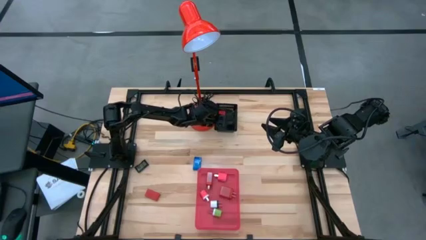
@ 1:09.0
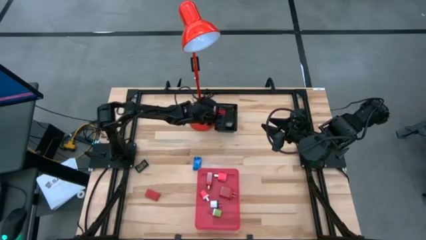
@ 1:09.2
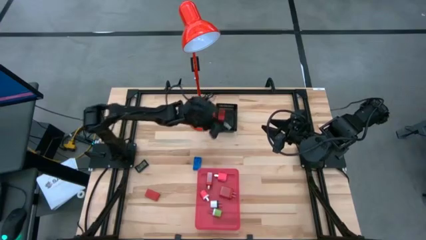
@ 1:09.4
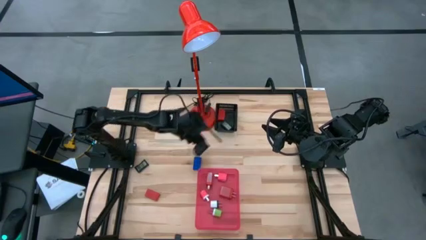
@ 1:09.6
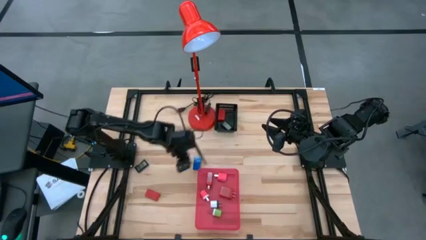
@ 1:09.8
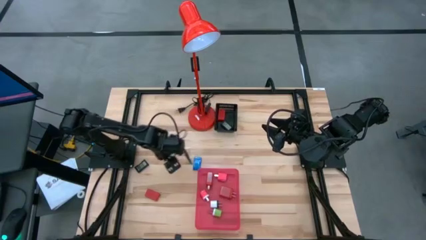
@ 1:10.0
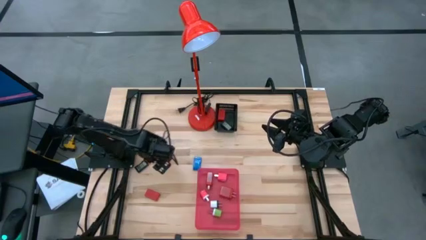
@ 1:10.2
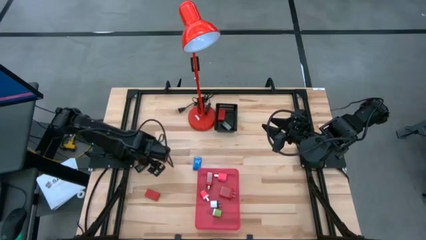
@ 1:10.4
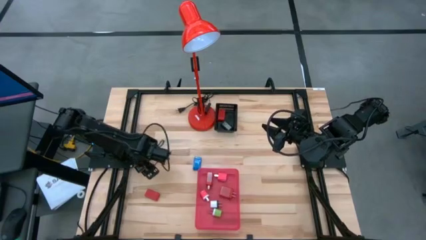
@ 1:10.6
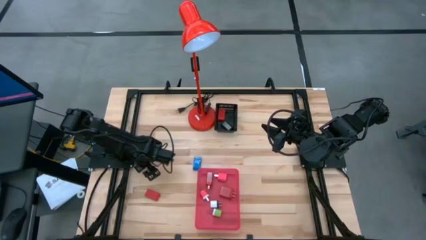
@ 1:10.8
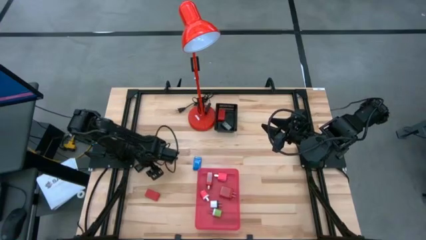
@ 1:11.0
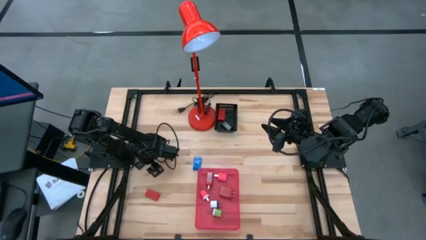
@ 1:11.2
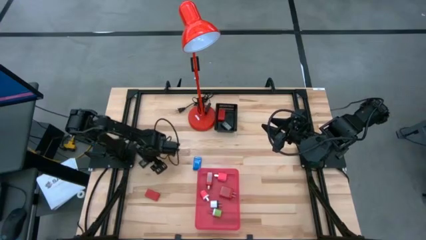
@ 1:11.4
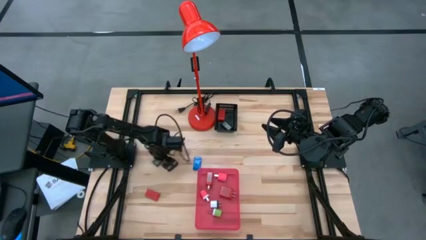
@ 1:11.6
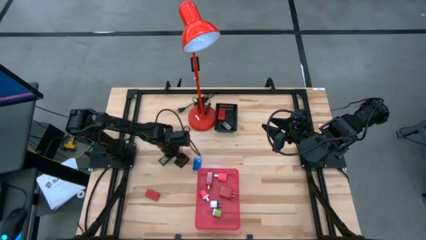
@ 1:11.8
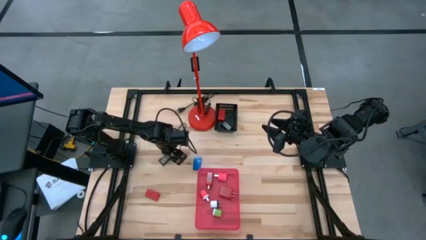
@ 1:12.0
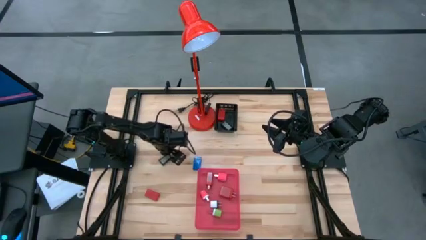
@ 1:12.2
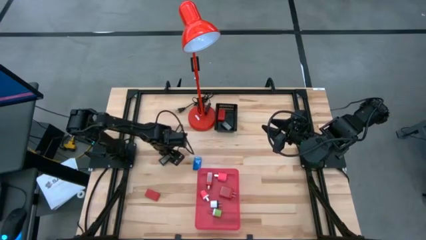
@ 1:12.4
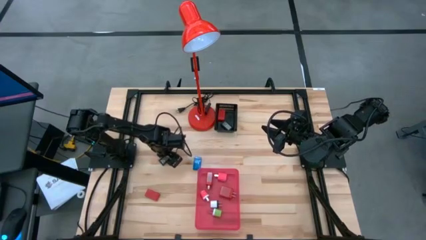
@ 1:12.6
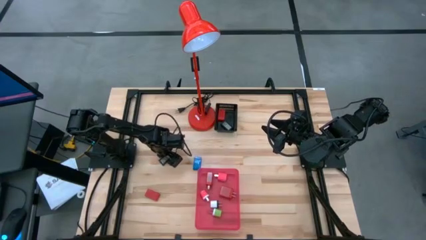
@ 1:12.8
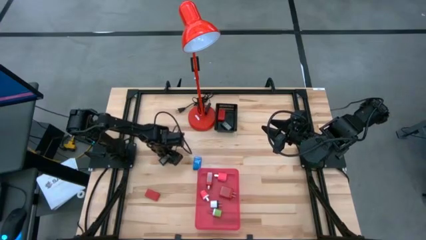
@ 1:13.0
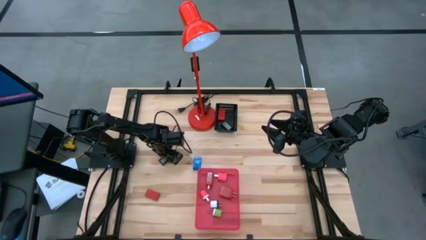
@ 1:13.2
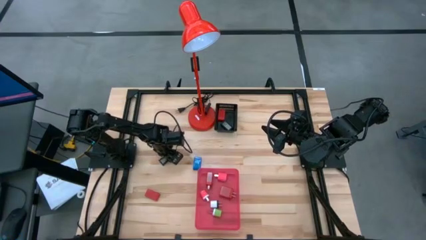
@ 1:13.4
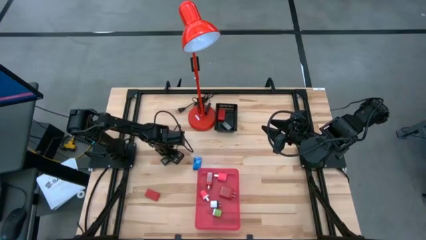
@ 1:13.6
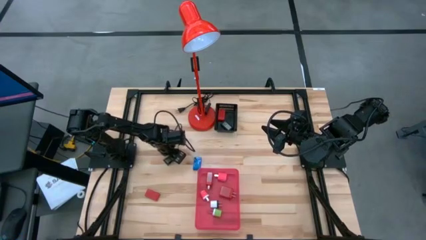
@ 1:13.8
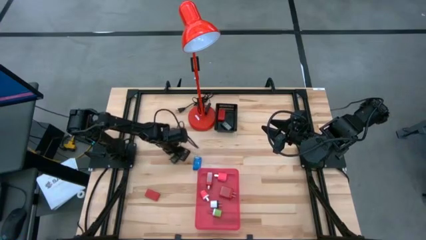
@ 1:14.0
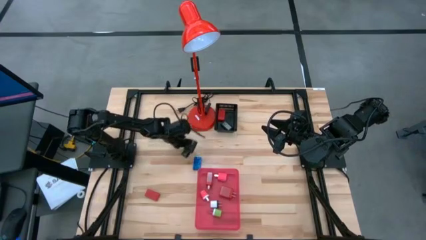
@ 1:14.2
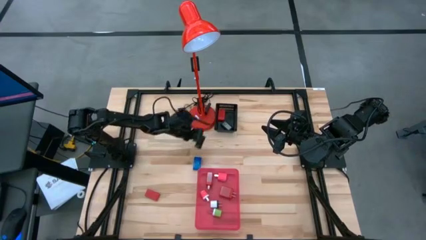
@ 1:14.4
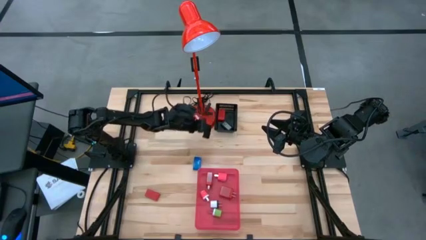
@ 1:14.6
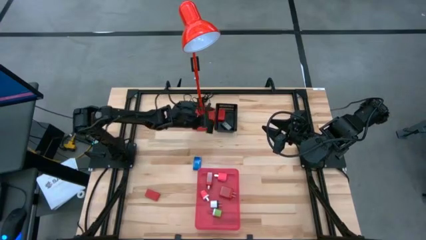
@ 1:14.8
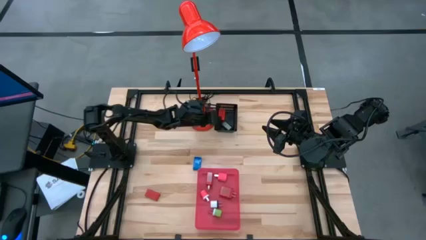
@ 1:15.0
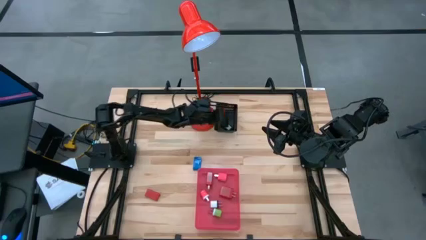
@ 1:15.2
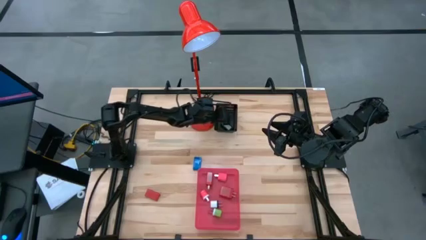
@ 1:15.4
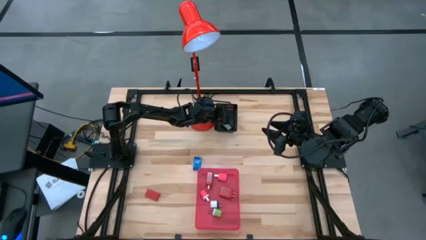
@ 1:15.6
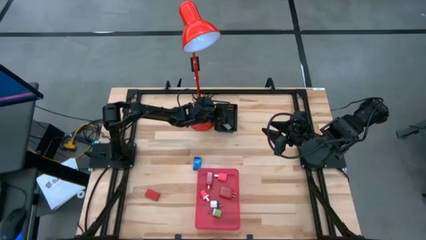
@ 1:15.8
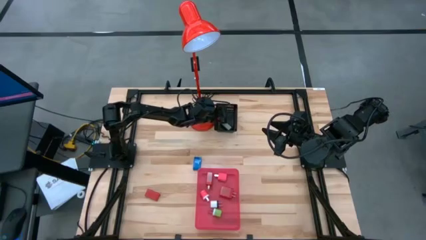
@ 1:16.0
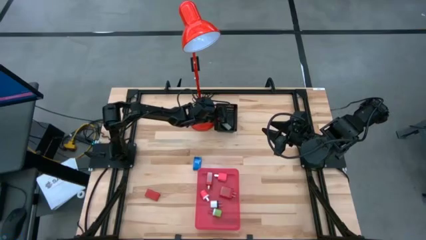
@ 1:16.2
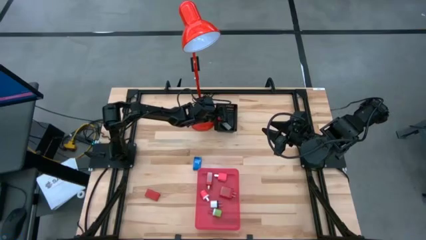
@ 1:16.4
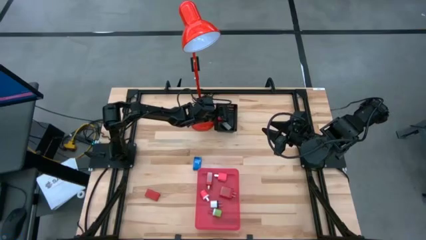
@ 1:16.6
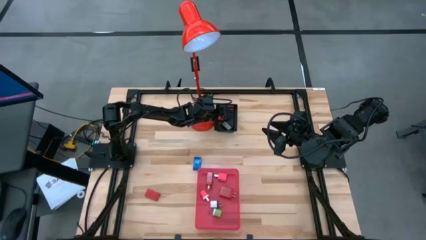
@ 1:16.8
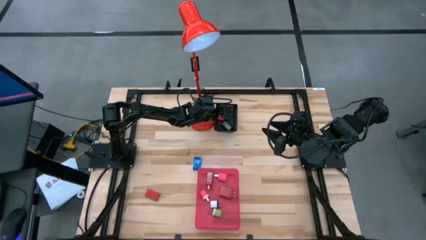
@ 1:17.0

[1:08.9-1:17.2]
Task: Pick & Place Office items
Put the black digital clock into the black bin

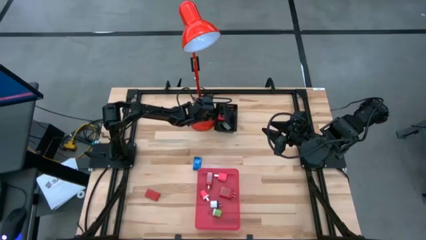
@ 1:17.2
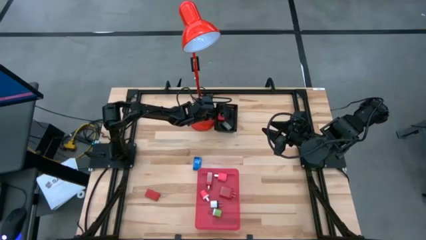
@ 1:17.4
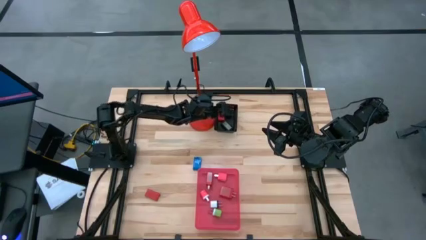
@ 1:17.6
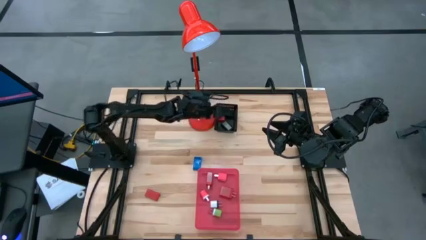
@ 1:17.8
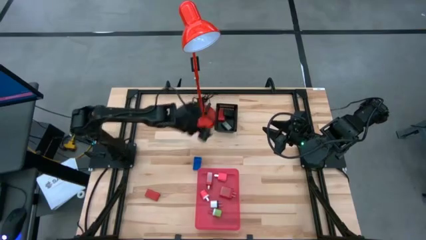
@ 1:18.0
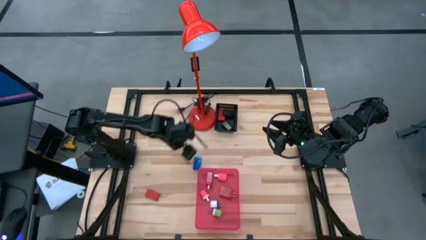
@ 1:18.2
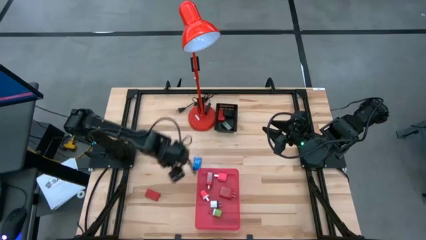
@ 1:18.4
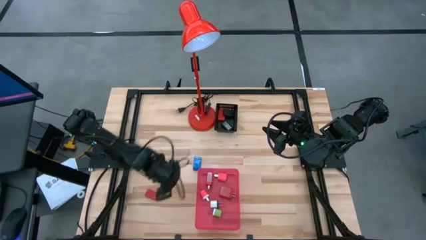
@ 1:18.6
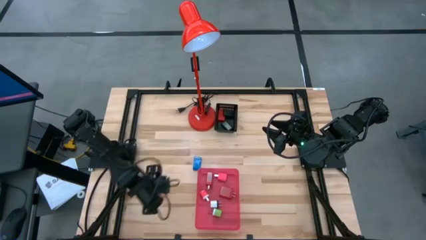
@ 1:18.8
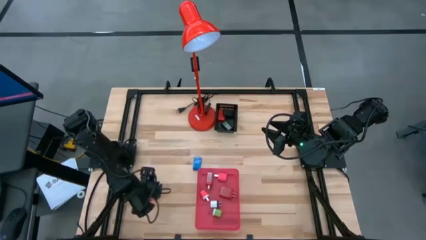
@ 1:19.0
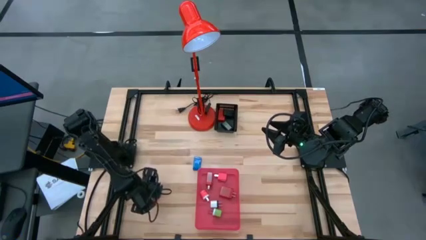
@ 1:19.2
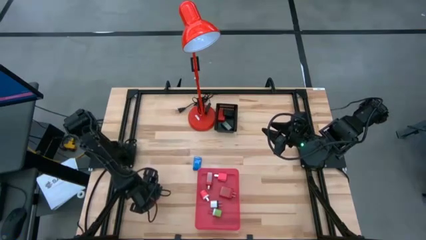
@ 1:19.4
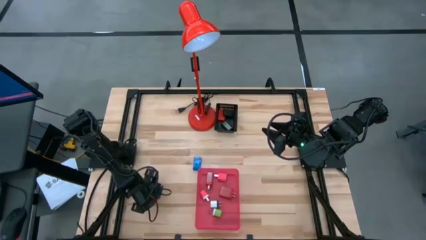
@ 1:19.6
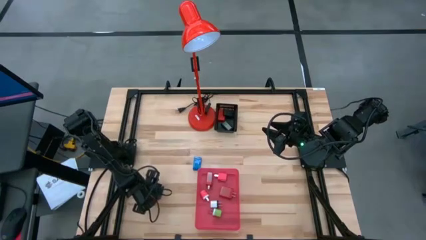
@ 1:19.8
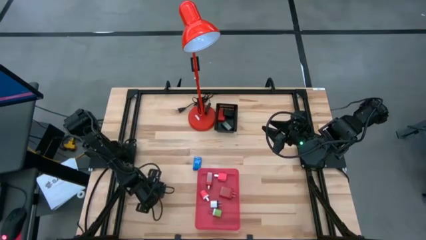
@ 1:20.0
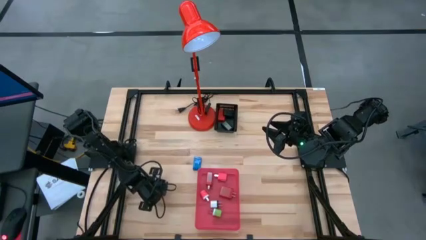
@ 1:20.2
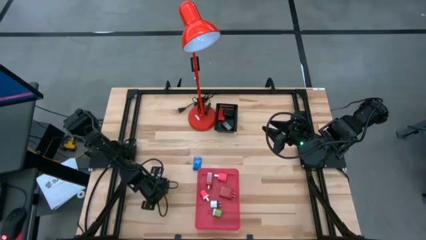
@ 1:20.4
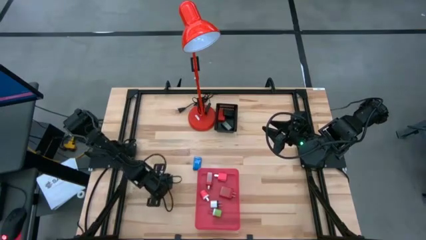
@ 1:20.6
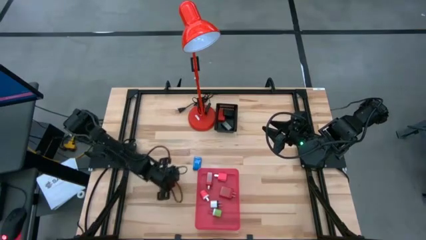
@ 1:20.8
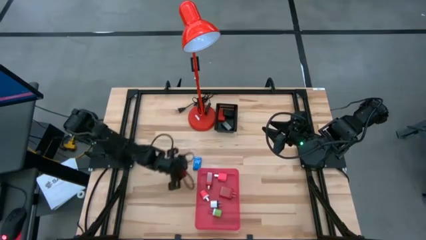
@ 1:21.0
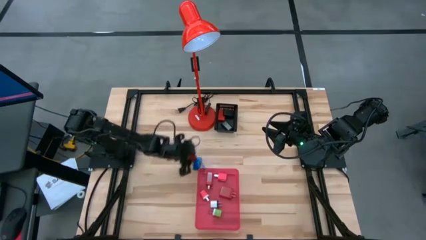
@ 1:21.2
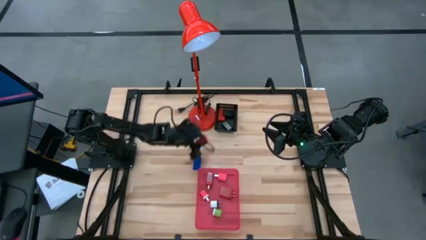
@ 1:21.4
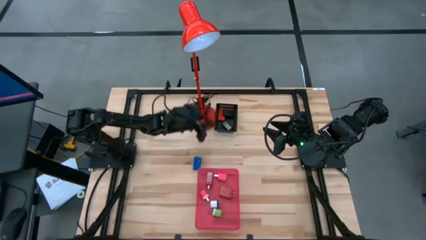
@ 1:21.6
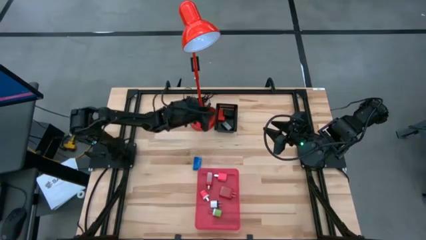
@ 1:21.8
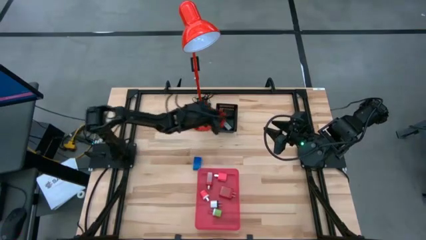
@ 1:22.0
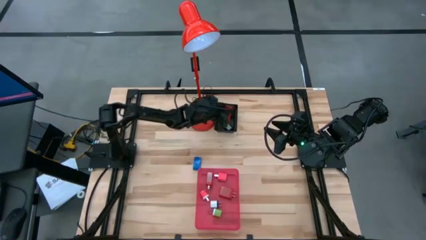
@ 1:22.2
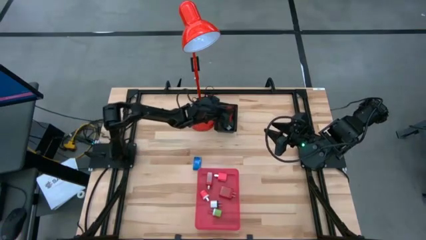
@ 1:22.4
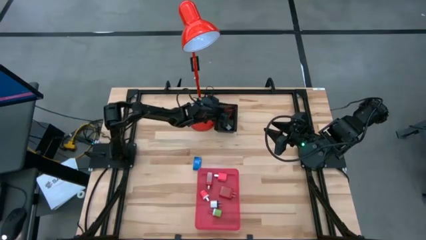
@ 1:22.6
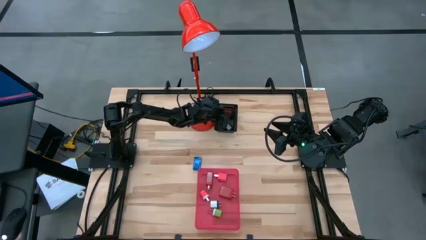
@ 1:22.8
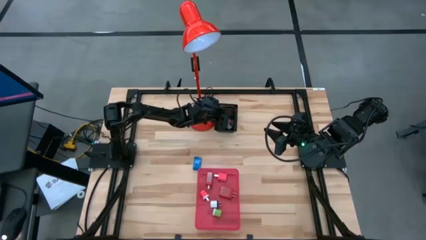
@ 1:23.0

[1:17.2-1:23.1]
Put the red digital clock into the black bin

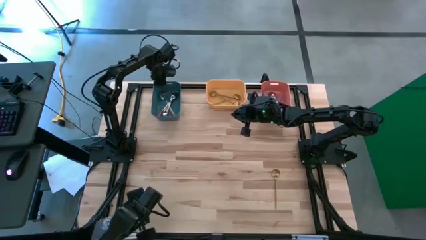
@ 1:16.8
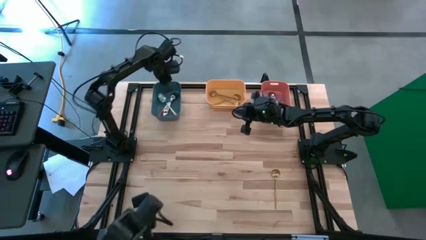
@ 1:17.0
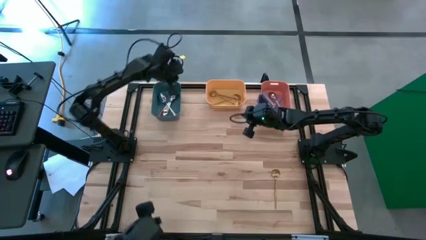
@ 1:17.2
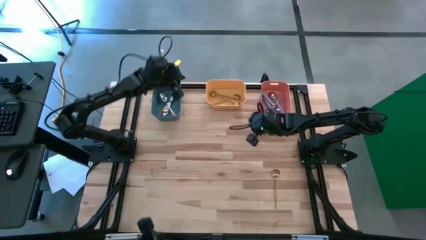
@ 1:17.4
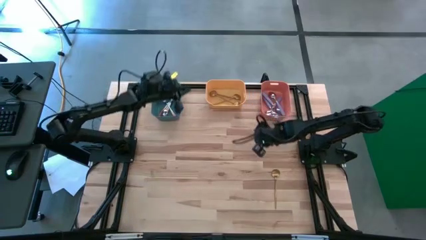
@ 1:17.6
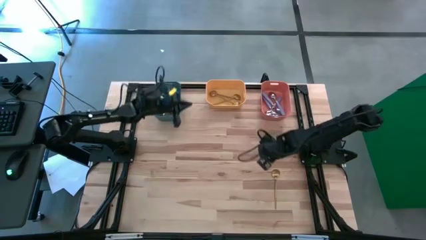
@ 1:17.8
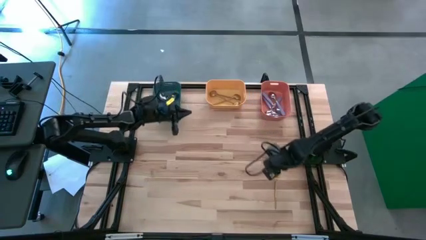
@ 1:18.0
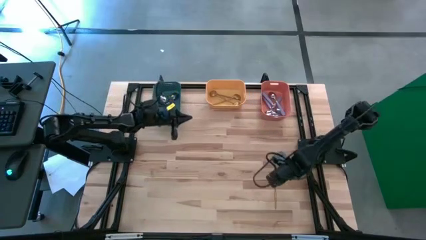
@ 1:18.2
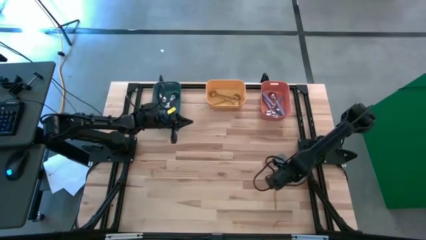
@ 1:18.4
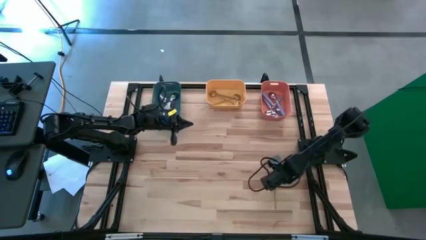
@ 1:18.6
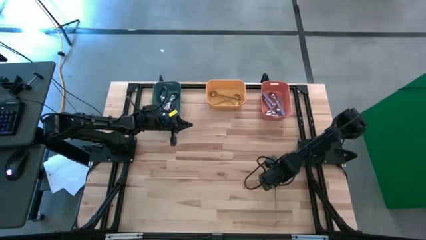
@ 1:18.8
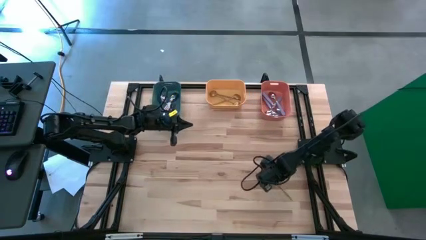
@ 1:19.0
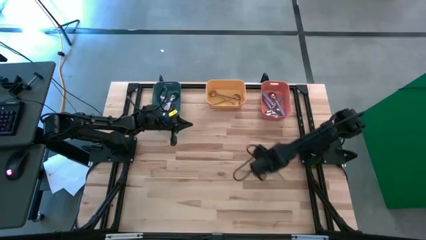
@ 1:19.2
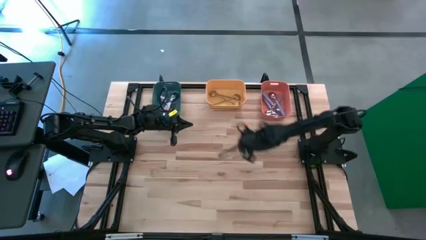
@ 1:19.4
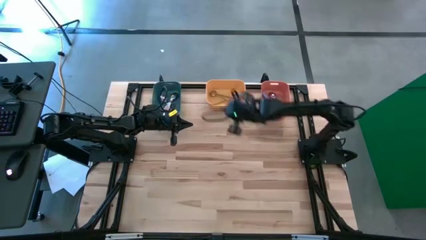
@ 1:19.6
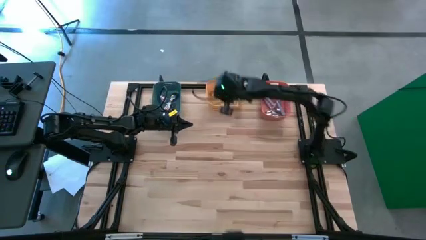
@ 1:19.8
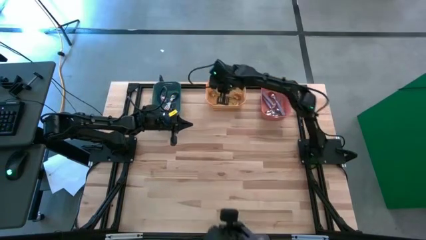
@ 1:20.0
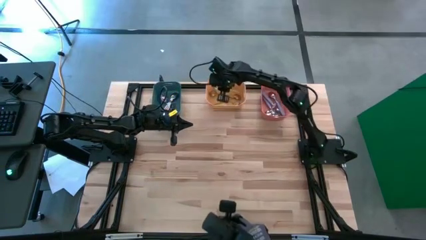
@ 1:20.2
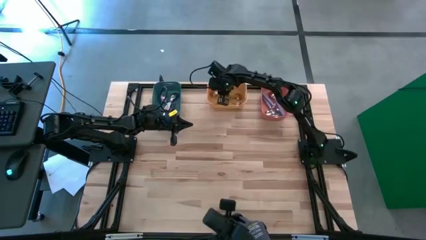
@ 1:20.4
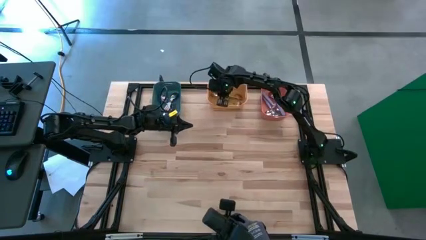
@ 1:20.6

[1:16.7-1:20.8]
Task: Sort silverware by color (type)
Put the gold spoon into the yellow bin
